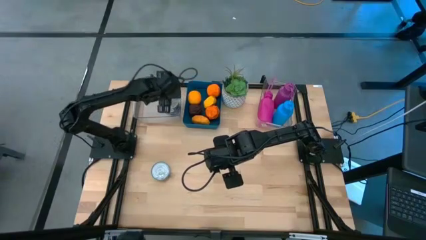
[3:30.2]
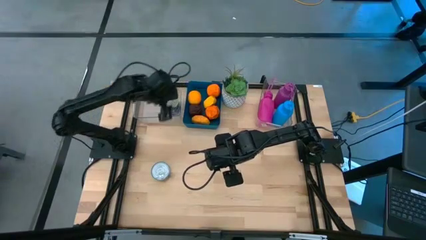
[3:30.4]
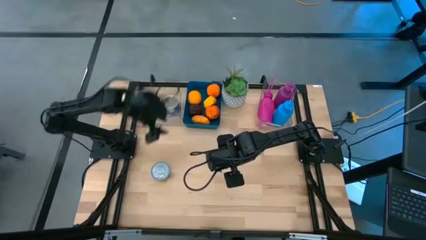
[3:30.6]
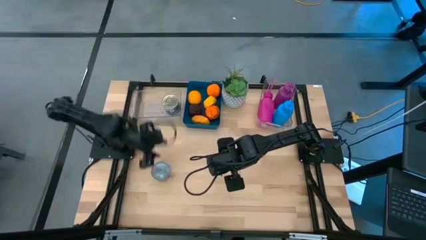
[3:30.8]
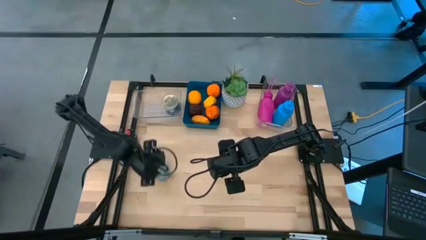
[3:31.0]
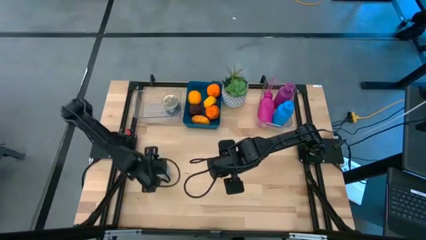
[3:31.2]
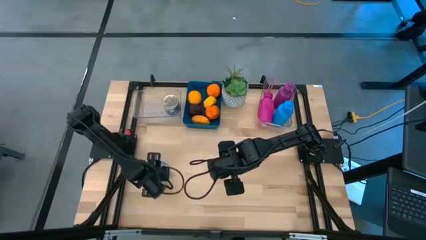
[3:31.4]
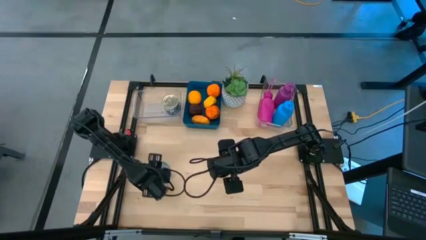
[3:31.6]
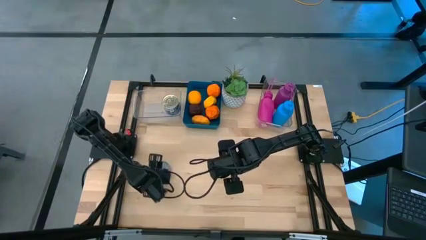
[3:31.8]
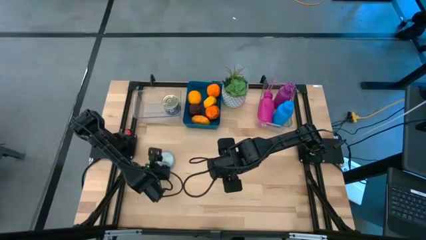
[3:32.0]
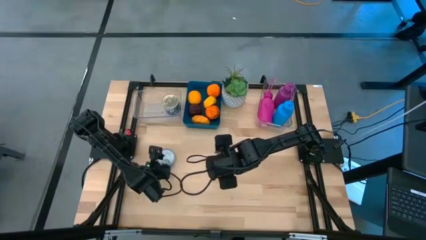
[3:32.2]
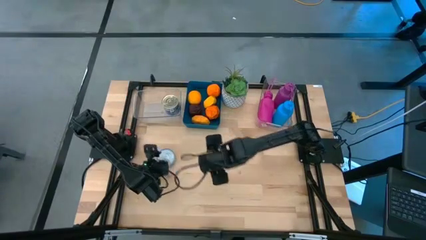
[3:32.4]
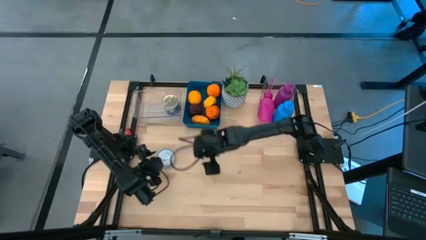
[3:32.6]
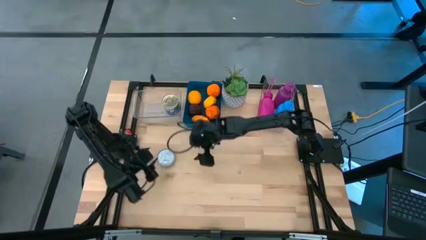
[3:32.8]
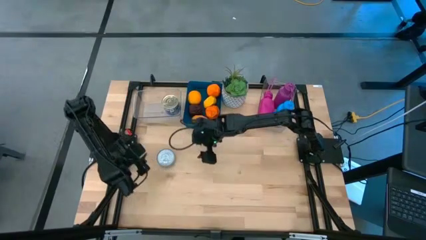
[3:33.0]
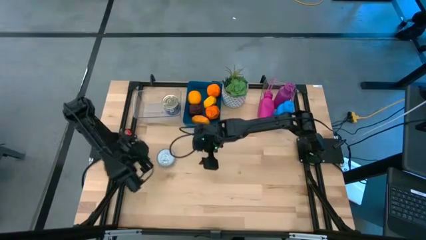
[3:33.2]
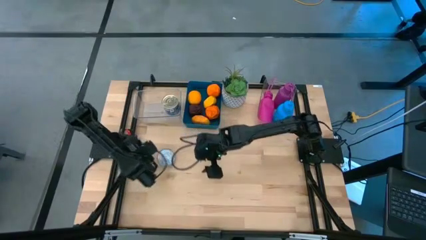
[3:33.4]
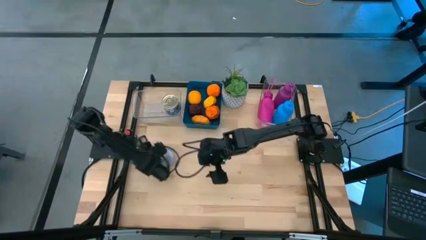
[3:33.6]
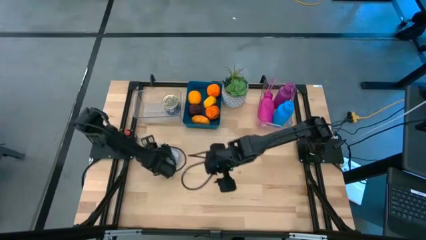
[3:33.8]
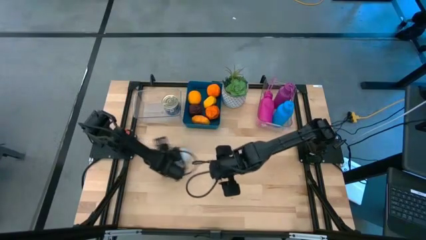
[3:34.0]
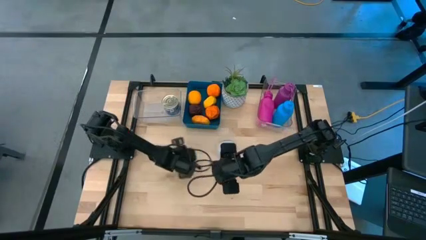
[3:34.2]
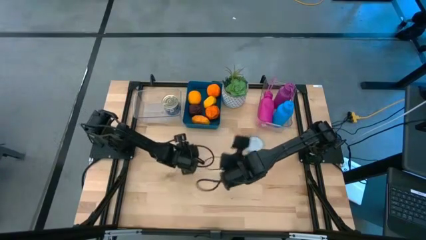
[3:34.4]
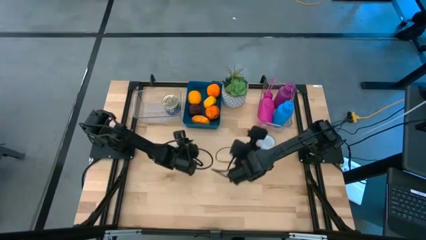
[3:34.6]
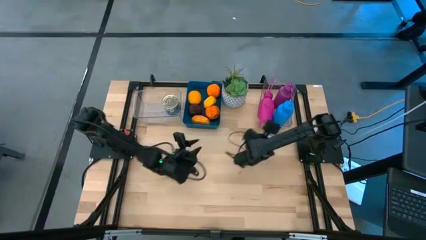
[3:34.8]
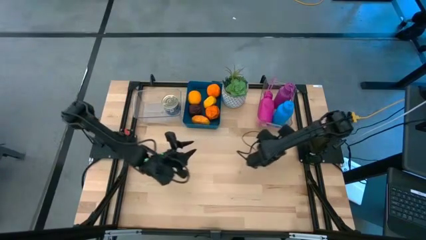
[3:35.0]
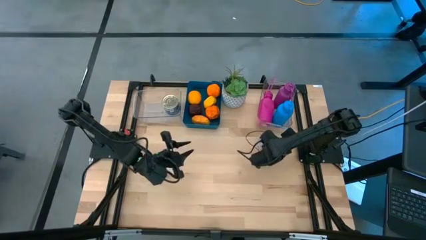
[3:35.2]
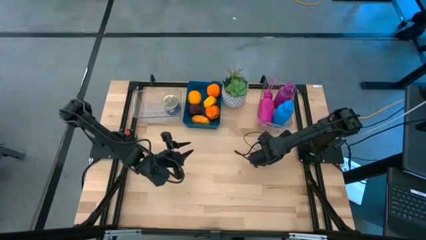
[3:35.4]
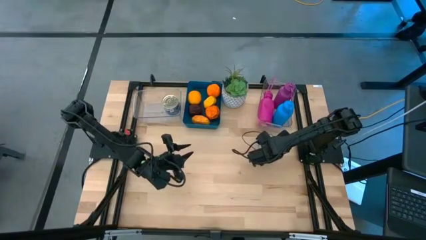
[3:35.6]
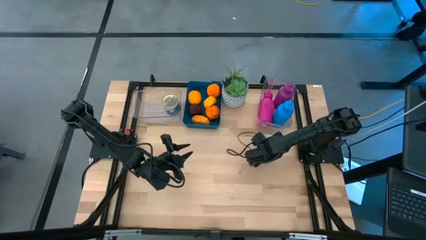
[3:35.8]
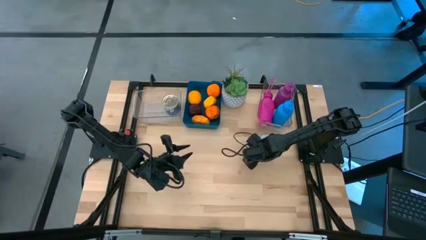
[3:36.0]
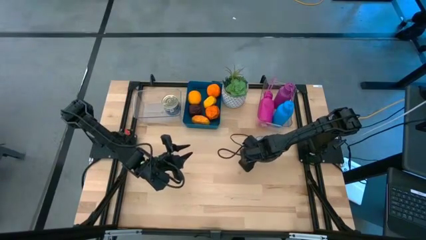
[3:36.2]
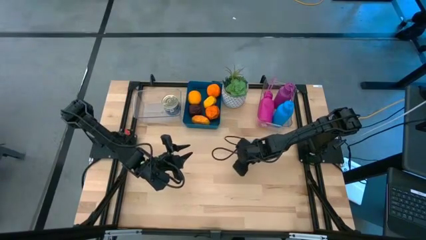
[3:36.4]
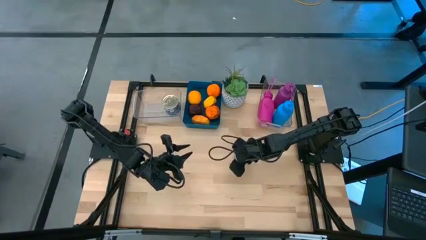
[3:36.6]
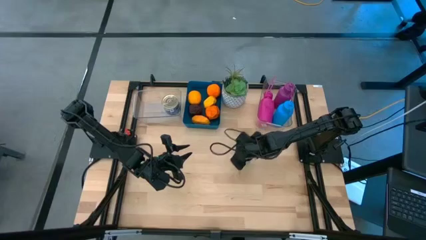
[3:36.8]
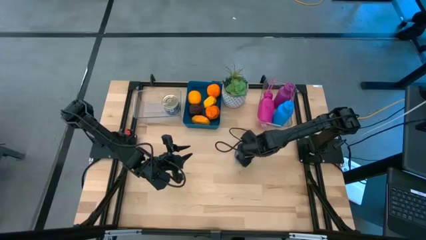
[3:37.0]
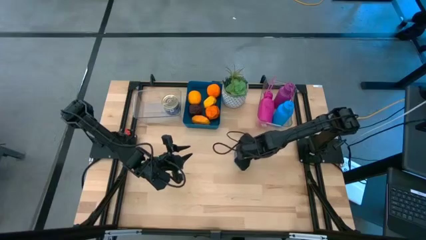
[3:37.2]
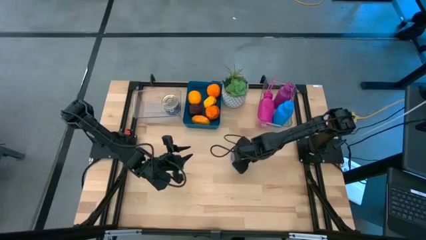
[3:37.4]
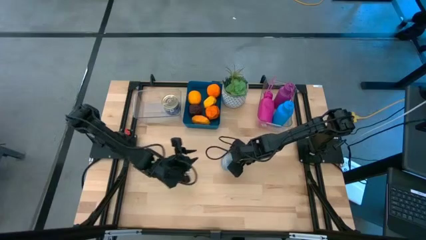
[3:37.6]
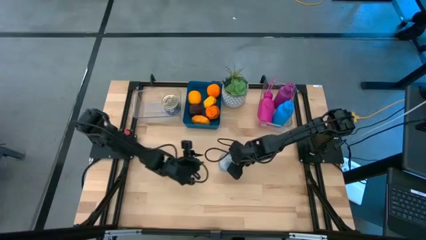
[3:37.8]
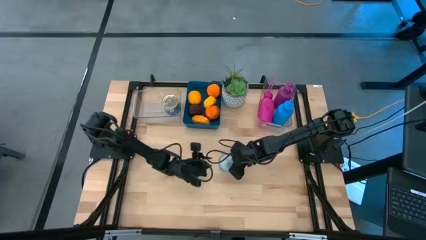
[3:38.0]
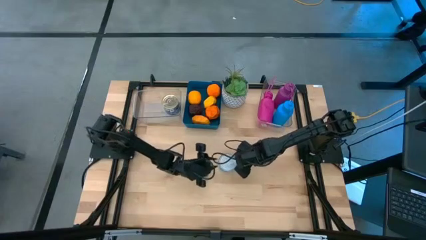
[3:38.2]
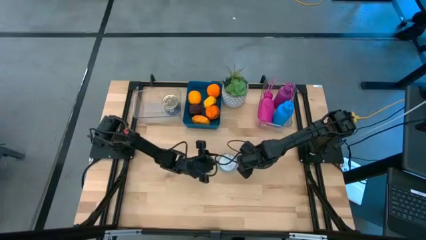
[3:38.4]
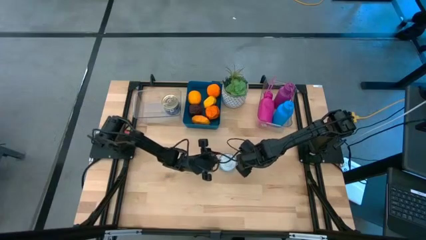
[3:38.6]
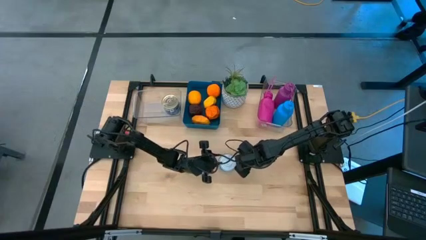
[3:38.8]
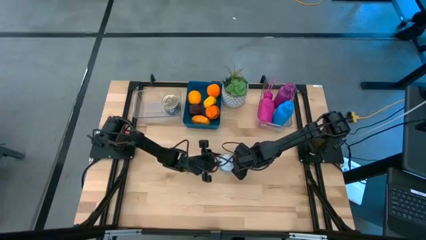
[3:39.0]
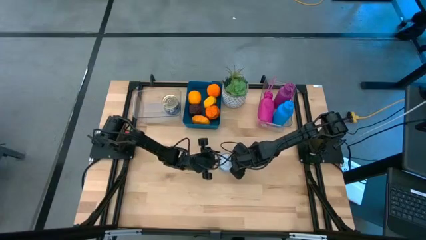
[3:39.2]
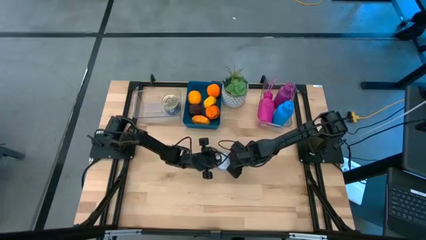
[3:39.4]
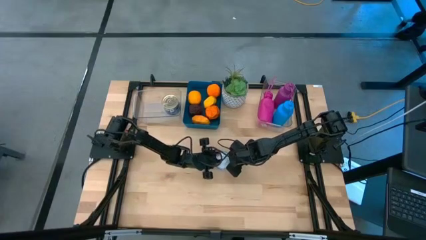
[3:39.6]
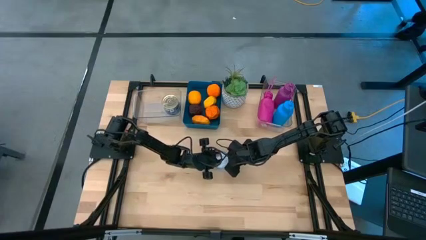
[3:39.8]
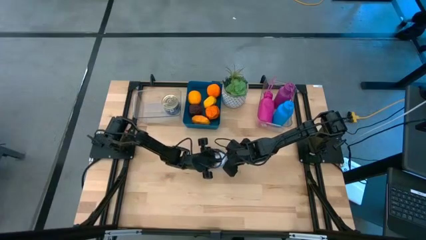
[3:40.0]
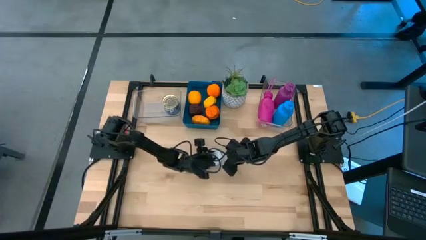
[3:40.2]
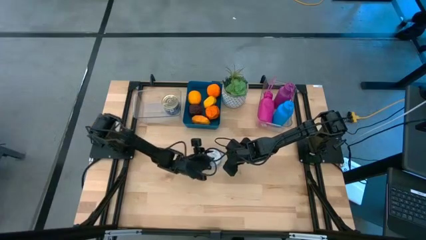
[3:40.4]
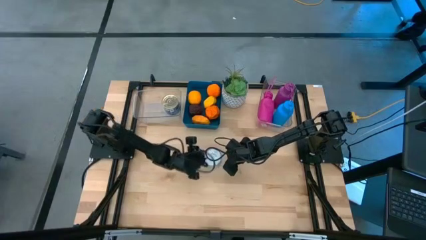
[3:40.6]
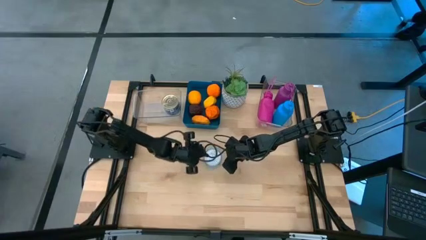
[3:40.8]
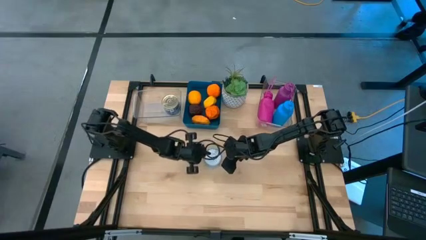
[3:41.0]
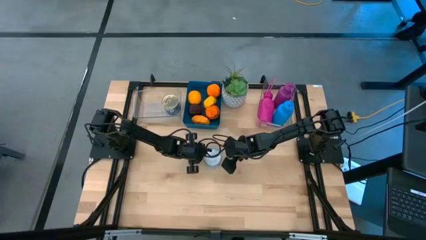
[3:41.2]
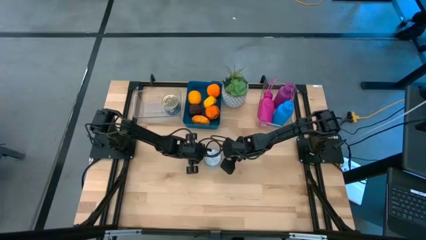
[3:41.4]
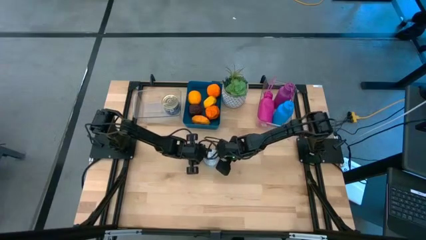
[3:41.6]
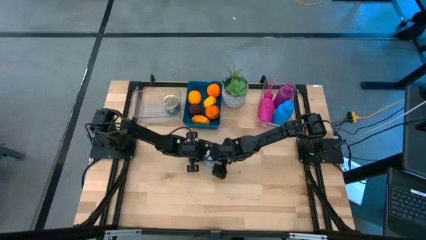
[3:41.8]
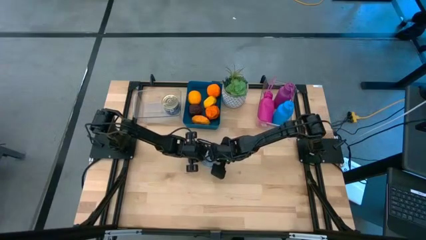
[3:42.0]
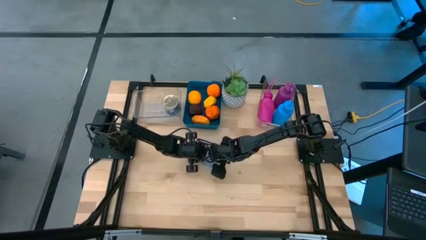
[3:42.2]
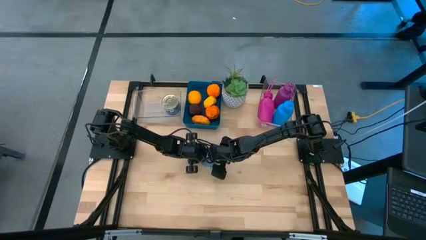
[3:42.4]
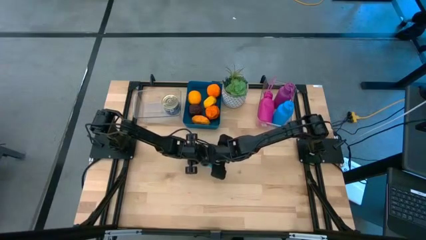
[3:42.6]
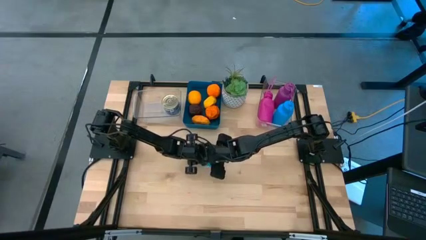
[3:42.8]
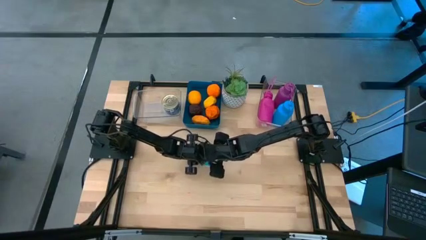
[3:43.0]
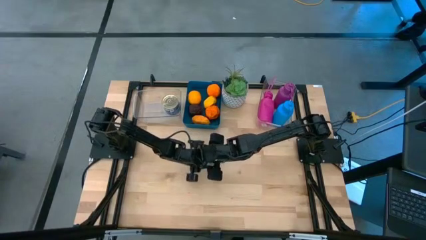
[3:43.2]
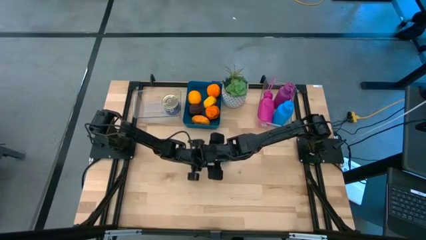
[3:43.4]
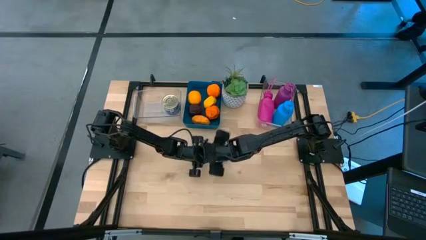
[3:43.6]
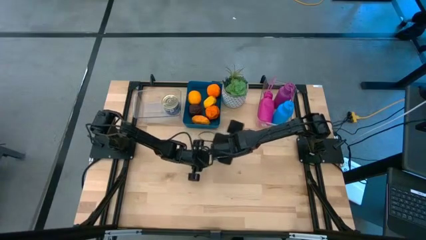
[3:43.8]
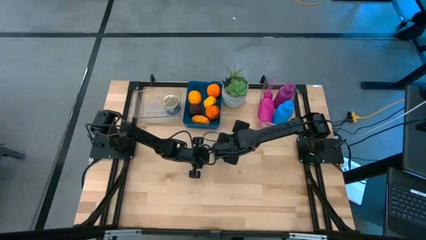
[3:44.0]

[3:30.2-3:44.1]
Task: Pick & Place Food Item
Stack the light blue tuna can on top of the blue and pink tuna can into the left transparent bin
